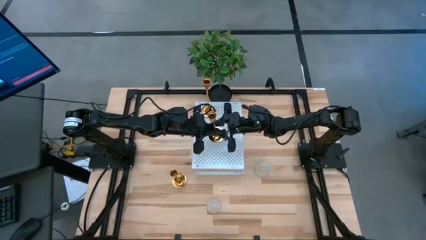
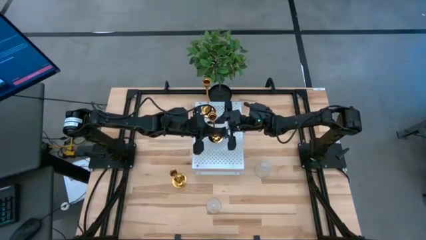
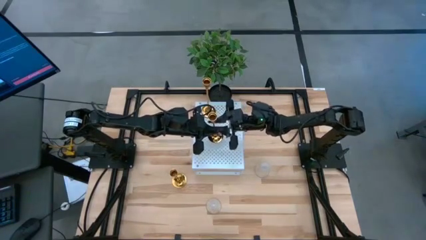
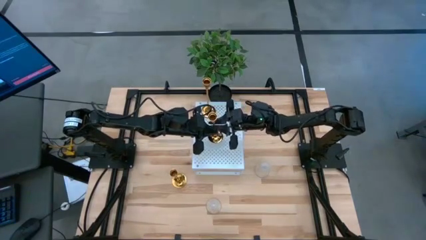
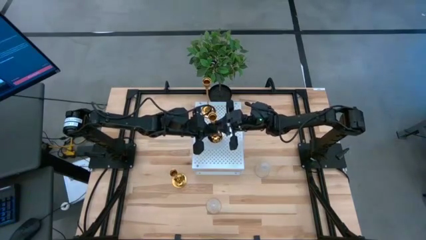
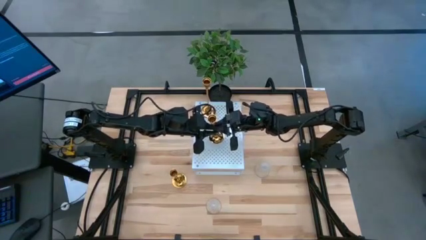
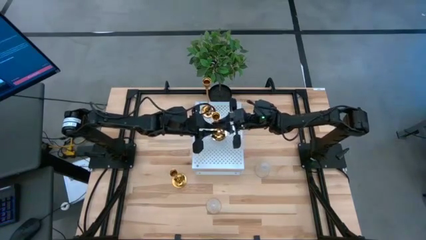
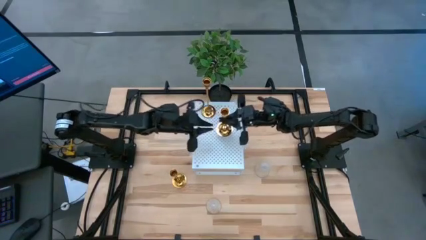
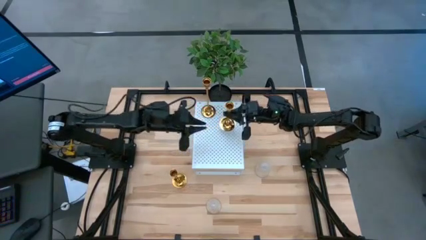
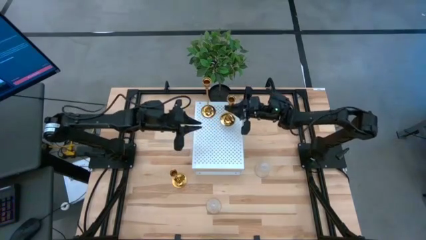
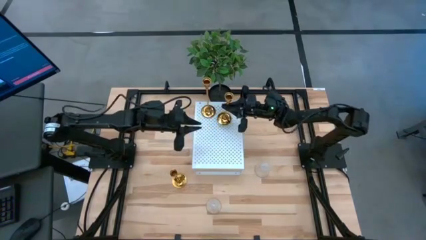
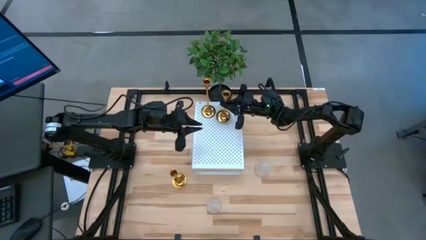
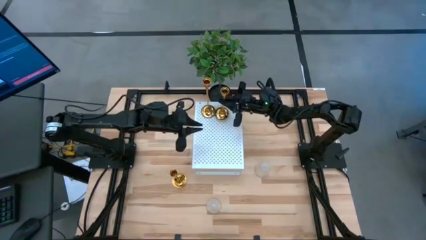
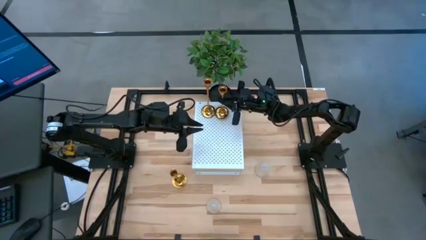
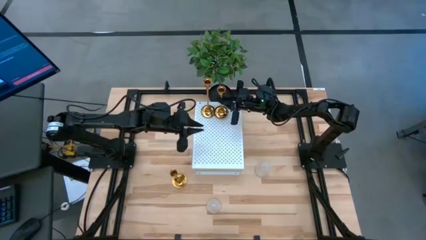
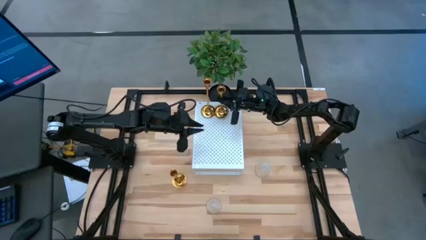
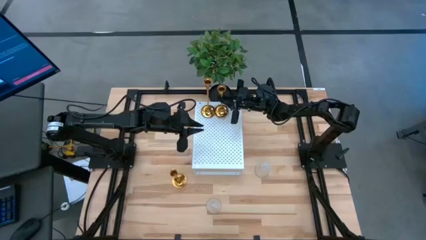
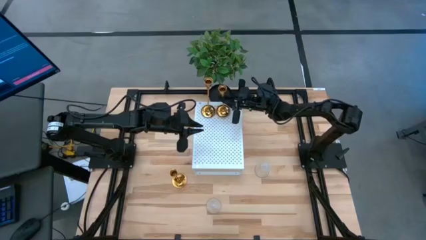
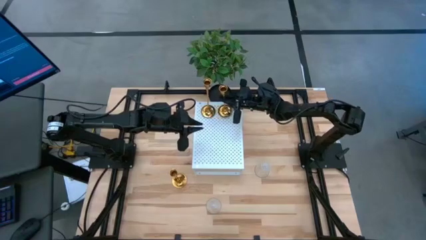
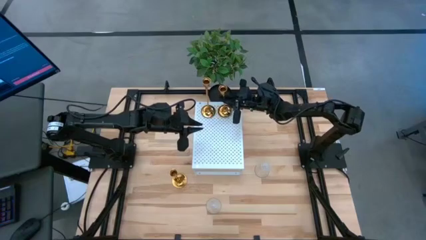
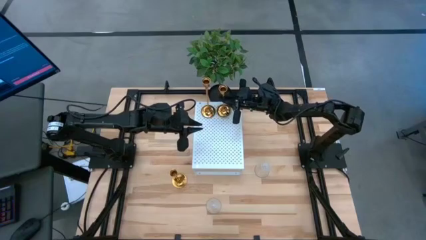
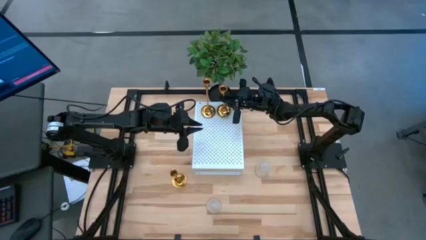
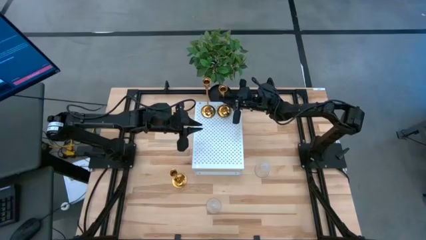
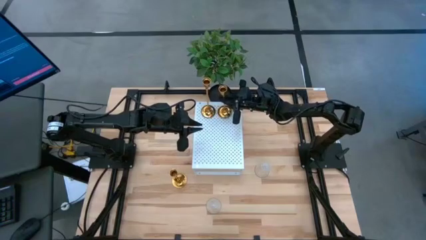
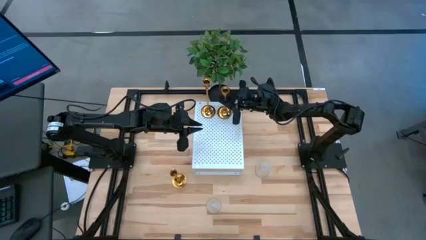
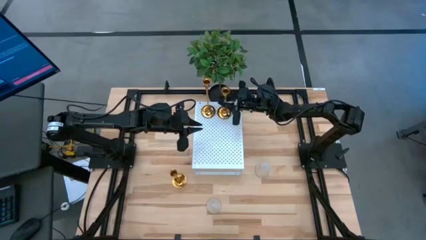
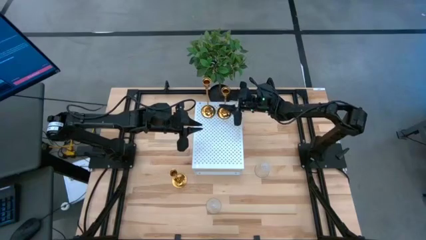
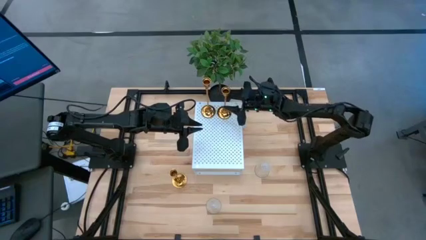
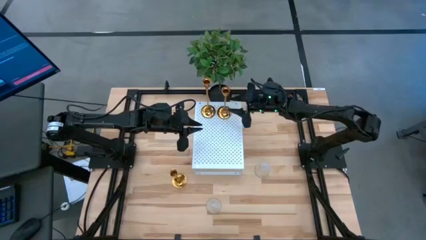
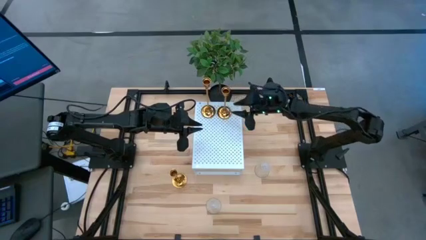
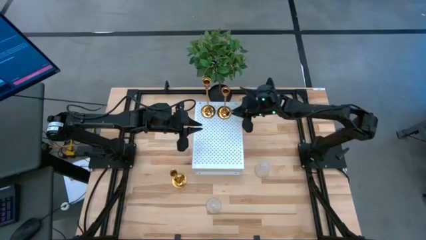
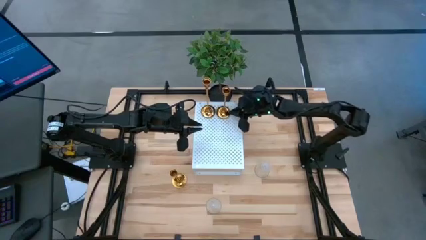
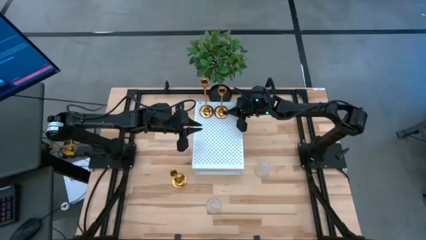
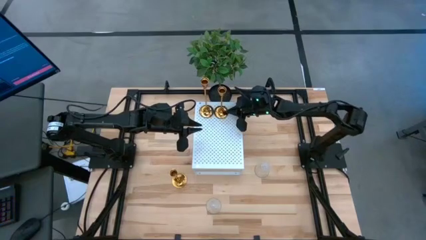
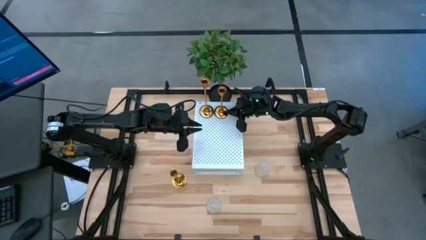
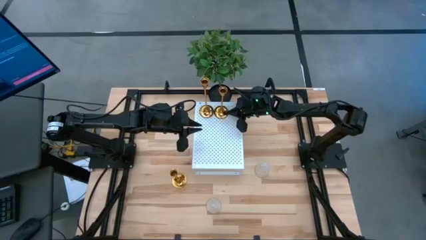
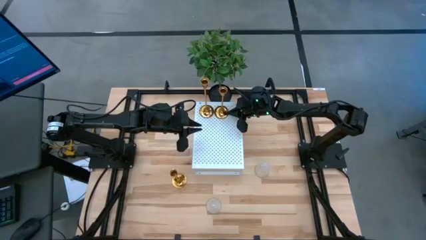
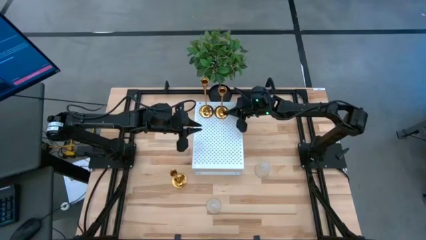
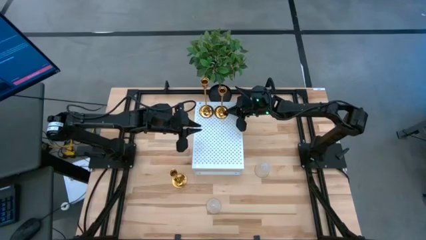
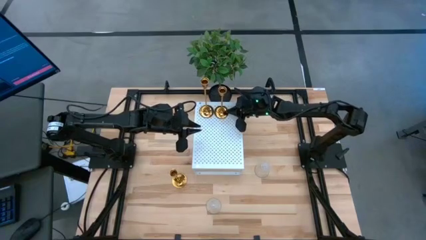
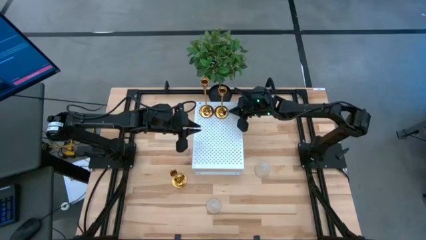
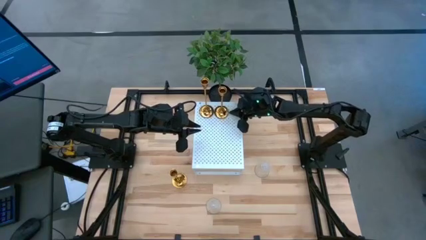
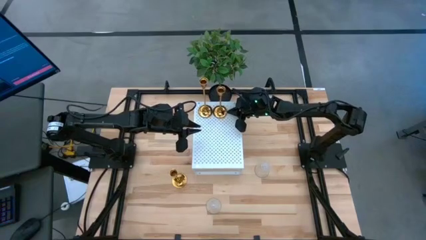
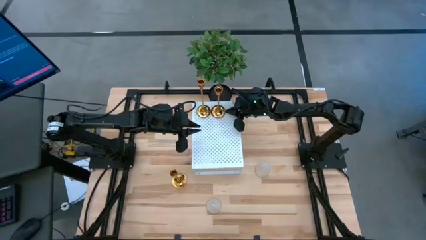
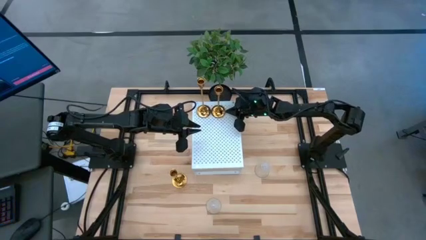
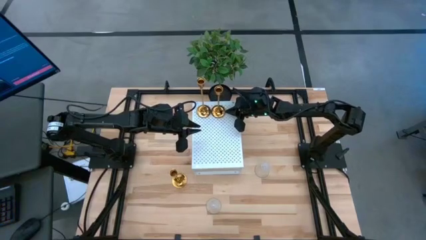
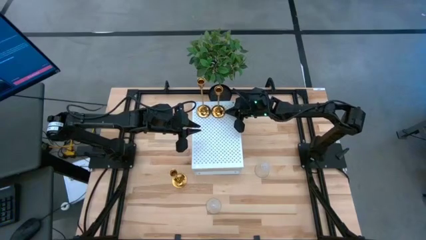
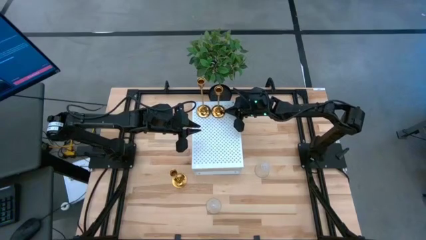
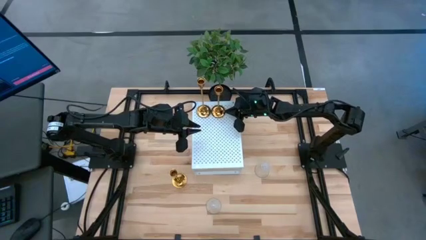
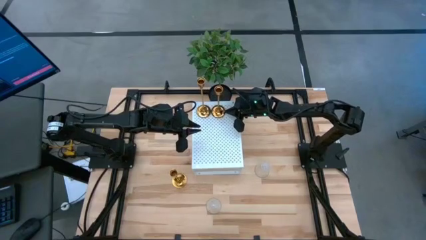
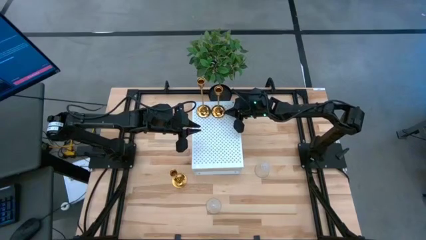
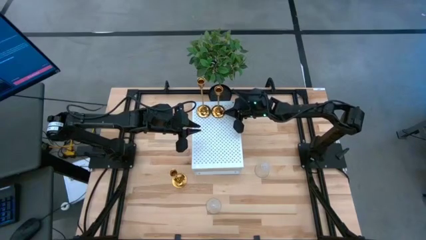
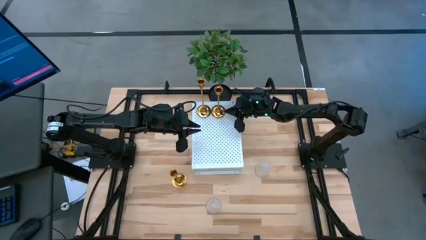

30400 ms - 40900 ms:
Task: Pick & Place candle stick holders
Align the top gold candle holder with the other gold candle holder on the shelf

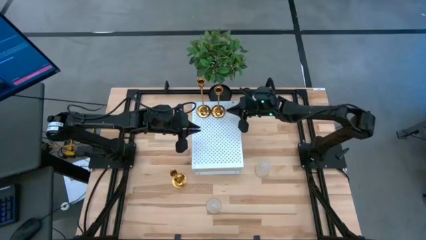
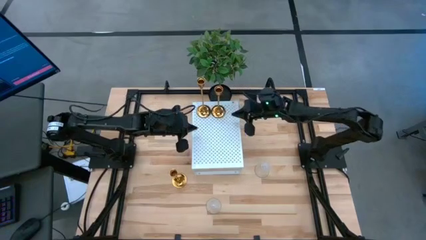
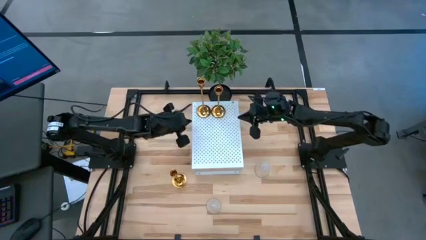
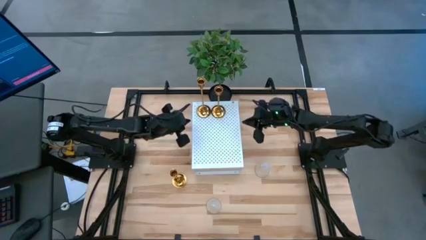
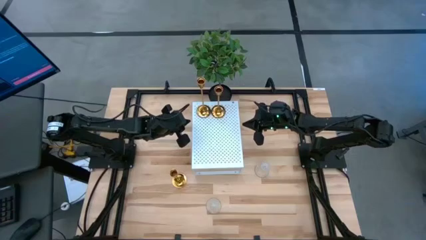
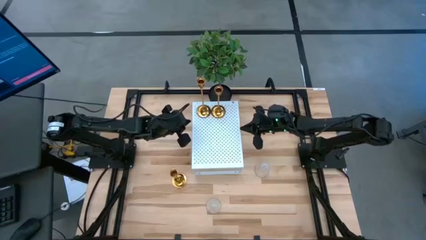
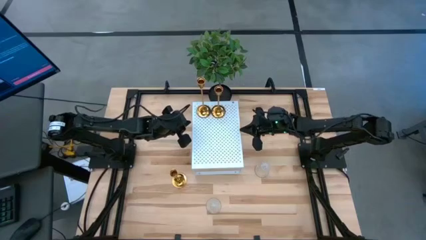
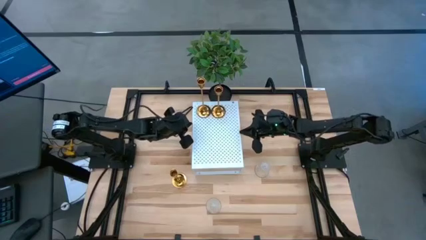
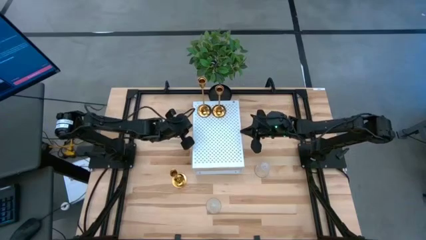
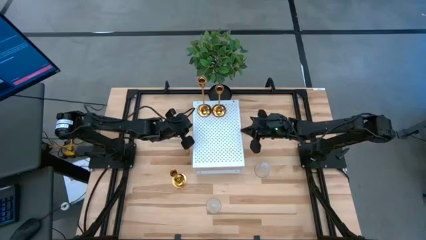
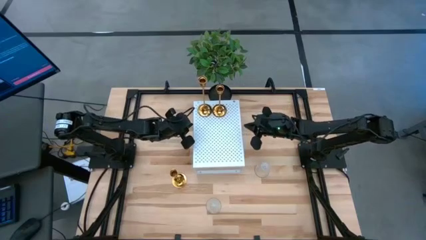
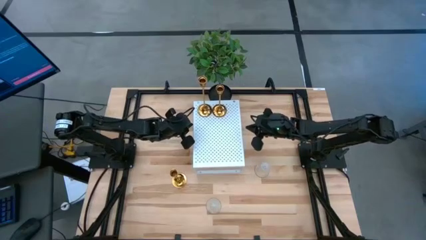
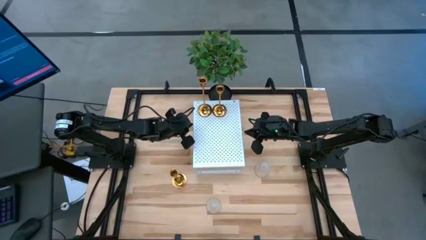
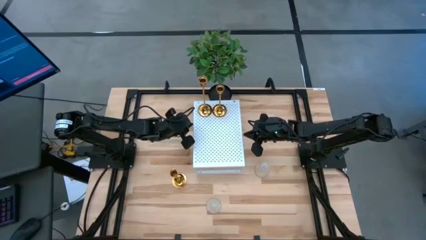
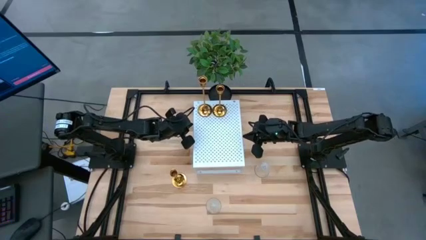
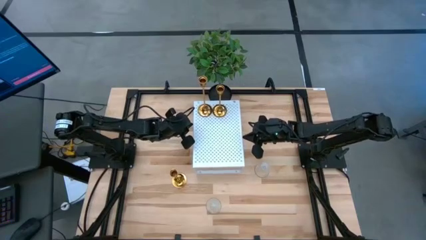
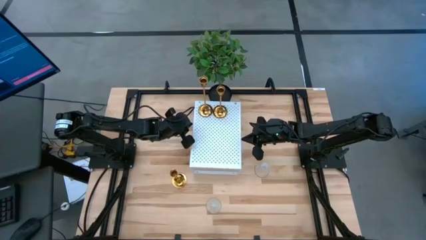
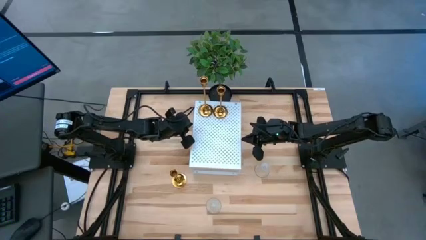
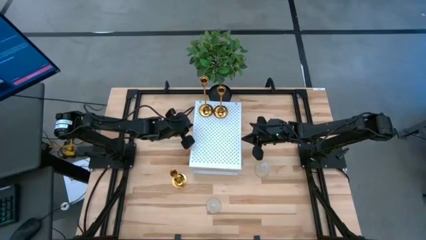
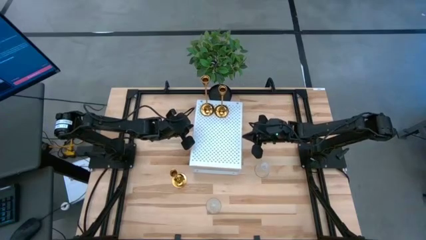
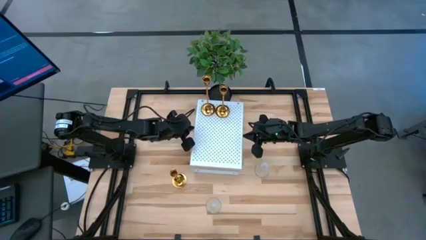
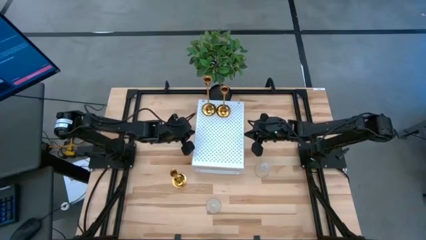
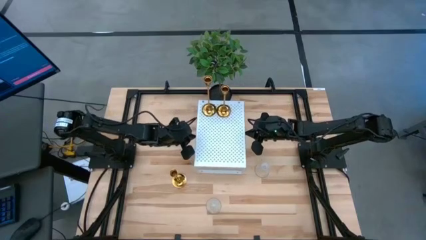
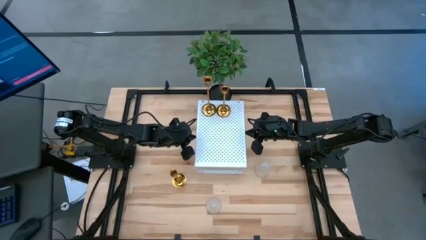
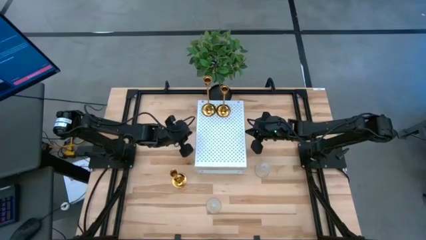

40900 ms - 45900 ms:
Adjust the shelf
